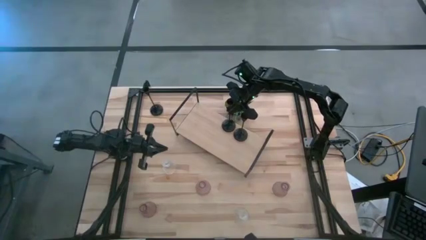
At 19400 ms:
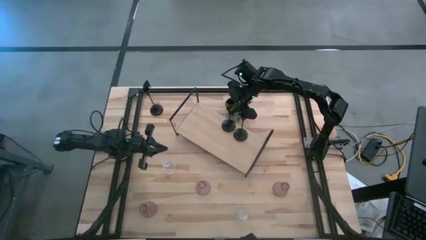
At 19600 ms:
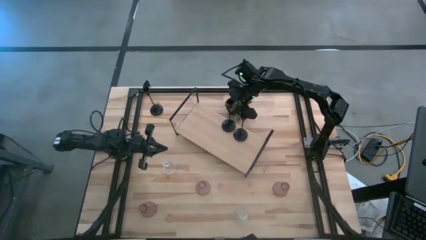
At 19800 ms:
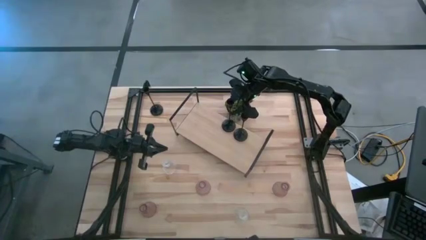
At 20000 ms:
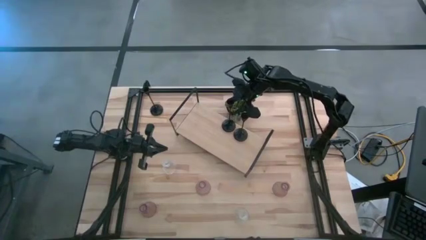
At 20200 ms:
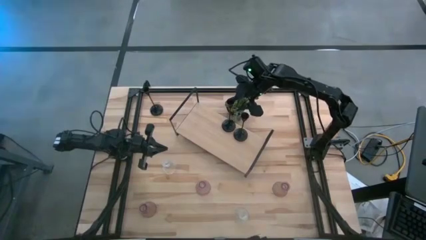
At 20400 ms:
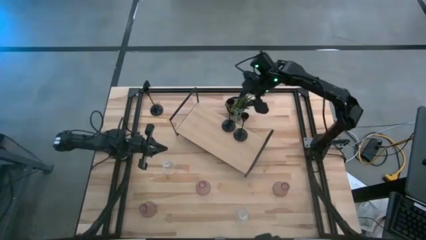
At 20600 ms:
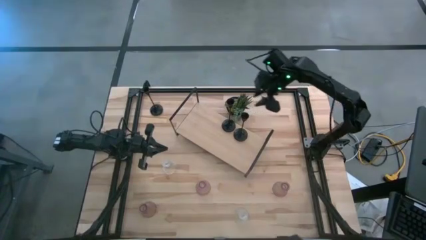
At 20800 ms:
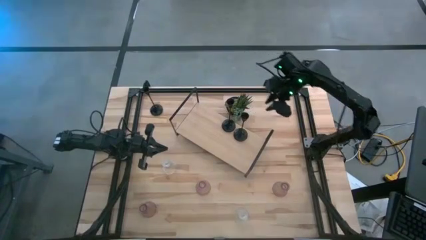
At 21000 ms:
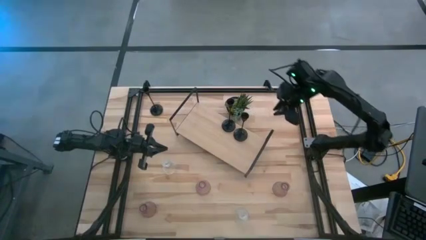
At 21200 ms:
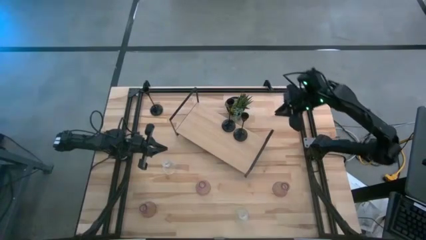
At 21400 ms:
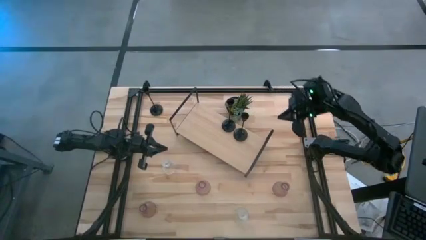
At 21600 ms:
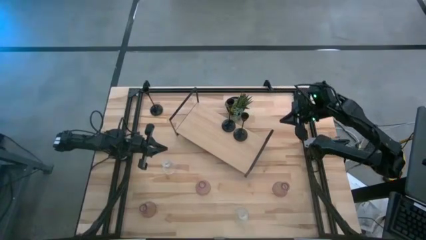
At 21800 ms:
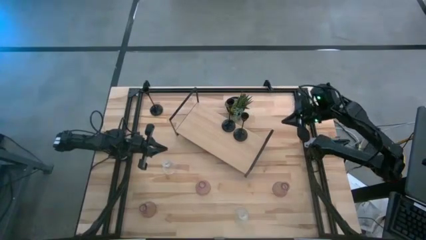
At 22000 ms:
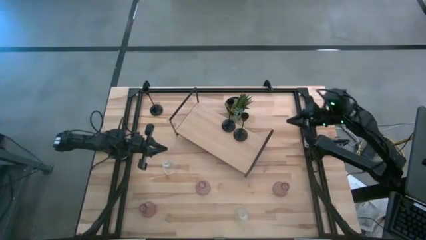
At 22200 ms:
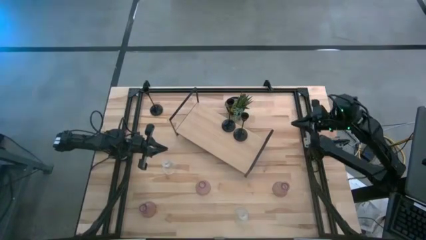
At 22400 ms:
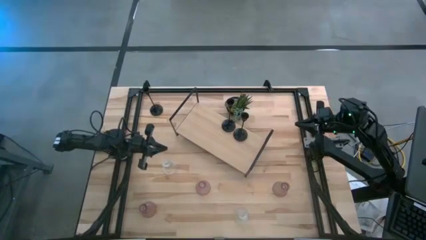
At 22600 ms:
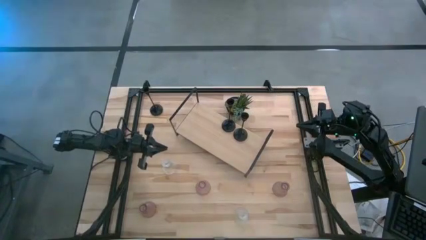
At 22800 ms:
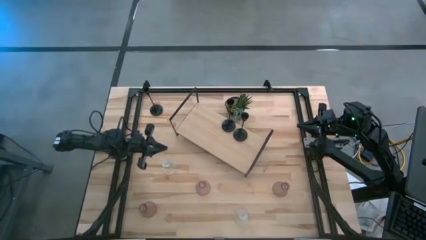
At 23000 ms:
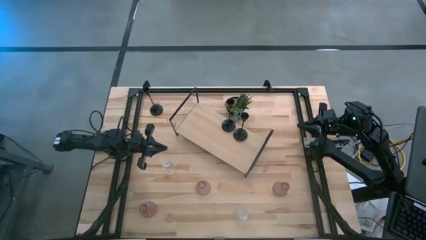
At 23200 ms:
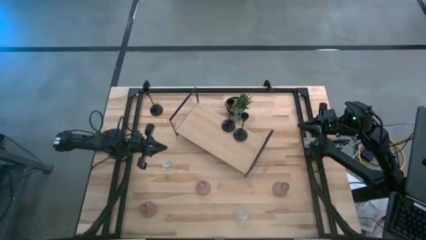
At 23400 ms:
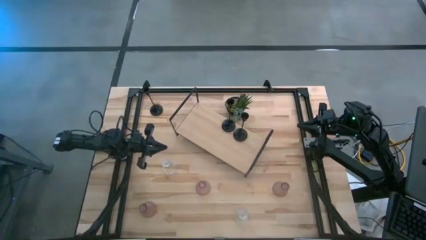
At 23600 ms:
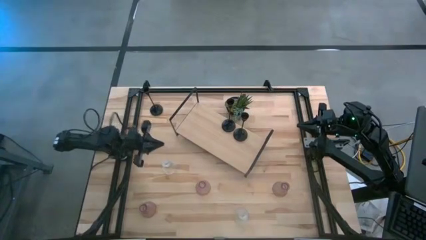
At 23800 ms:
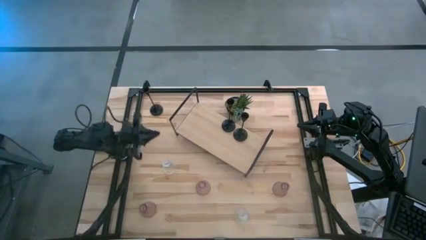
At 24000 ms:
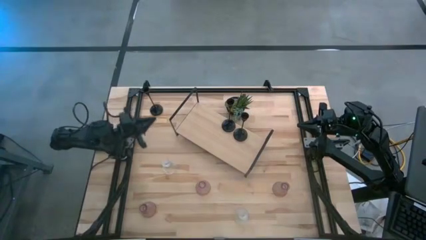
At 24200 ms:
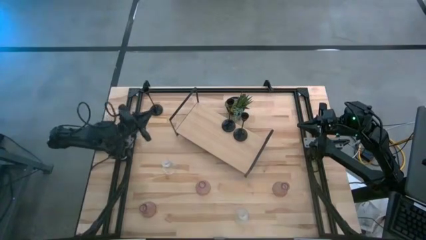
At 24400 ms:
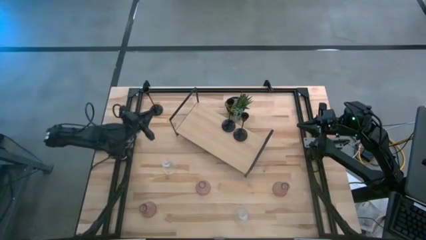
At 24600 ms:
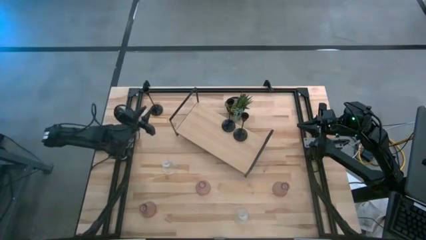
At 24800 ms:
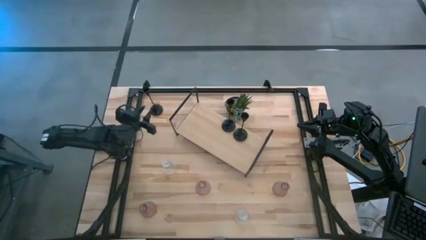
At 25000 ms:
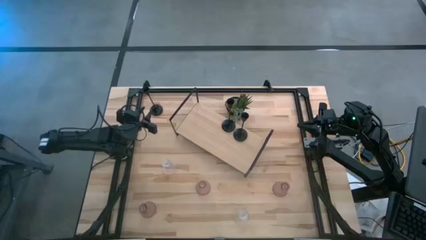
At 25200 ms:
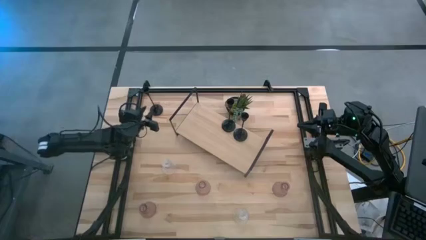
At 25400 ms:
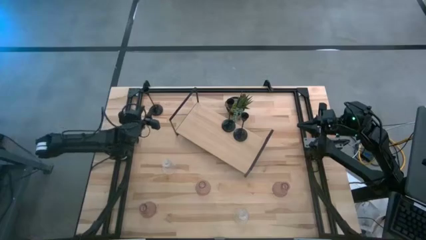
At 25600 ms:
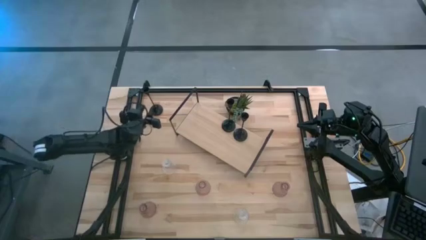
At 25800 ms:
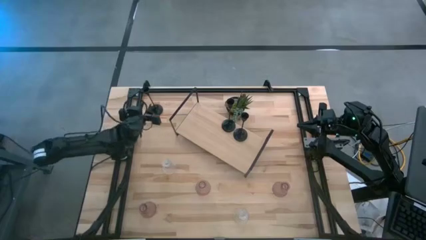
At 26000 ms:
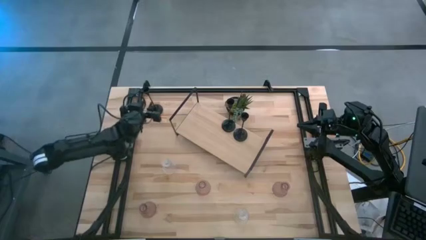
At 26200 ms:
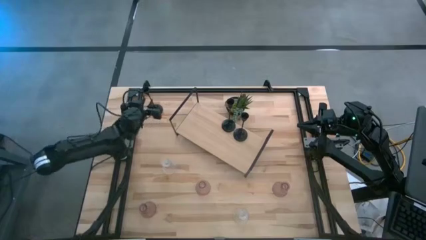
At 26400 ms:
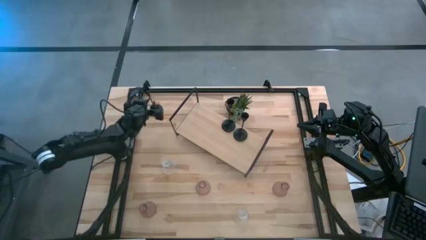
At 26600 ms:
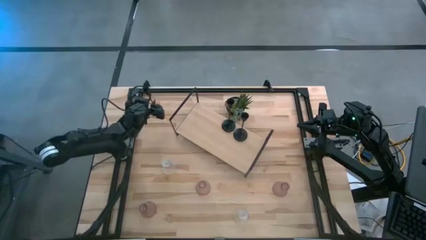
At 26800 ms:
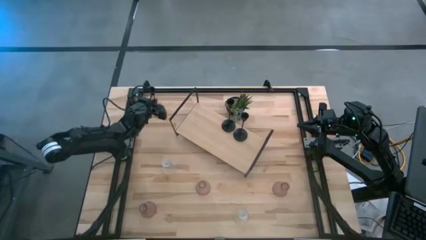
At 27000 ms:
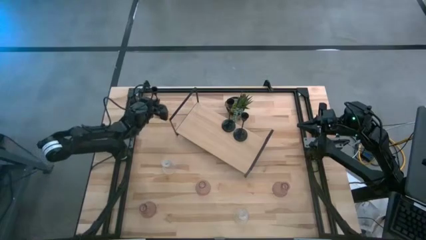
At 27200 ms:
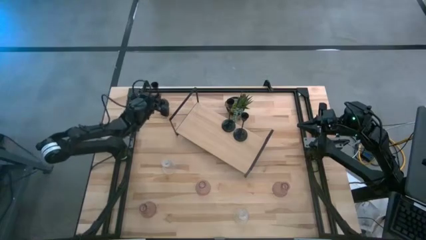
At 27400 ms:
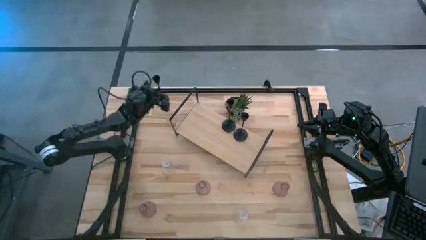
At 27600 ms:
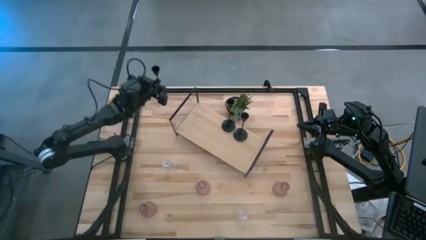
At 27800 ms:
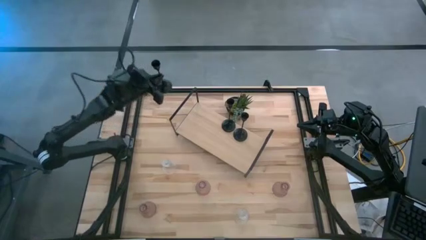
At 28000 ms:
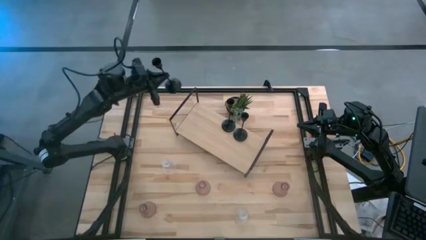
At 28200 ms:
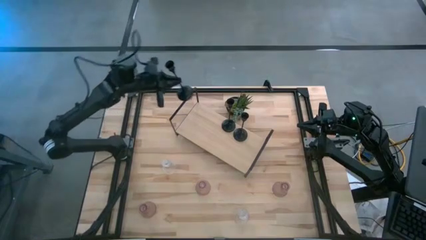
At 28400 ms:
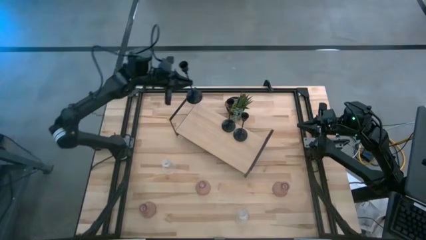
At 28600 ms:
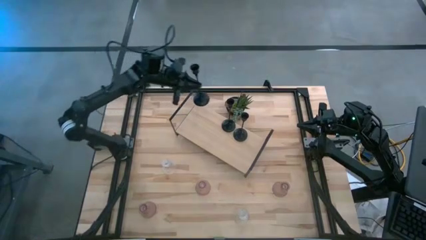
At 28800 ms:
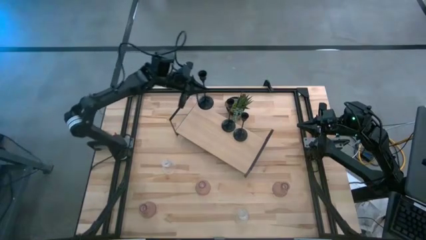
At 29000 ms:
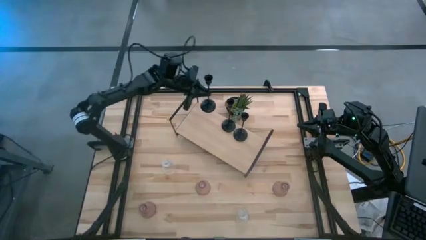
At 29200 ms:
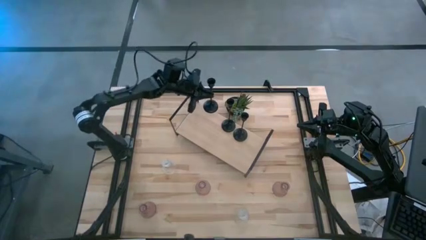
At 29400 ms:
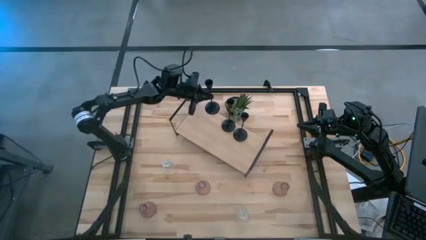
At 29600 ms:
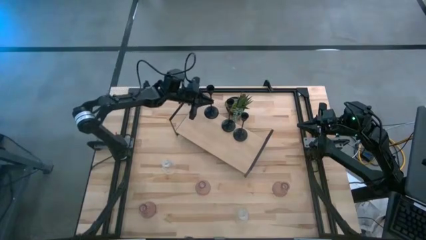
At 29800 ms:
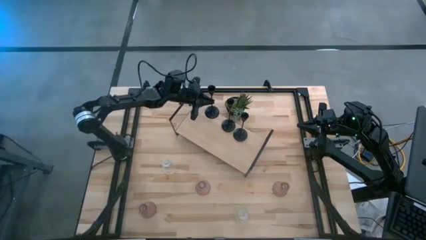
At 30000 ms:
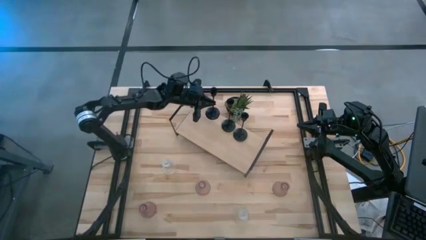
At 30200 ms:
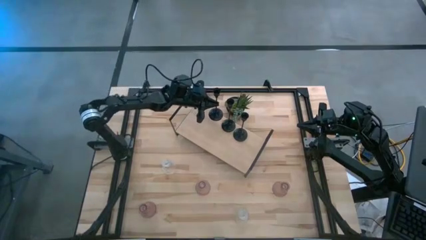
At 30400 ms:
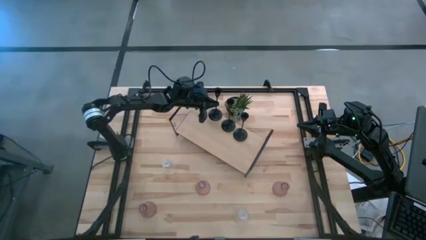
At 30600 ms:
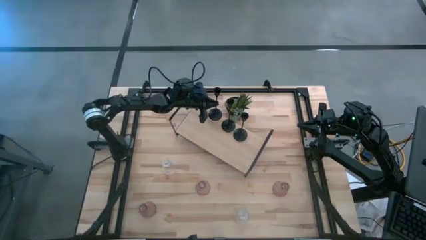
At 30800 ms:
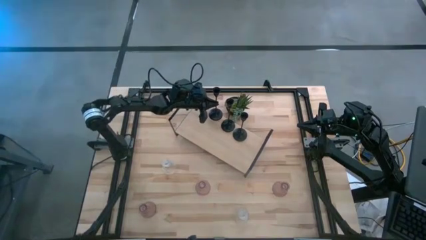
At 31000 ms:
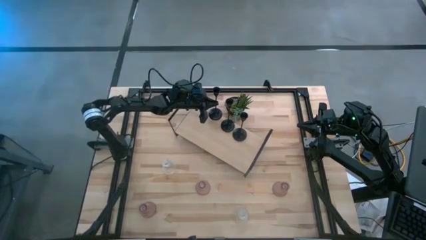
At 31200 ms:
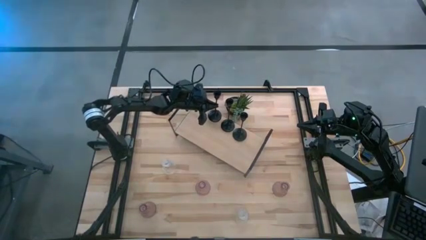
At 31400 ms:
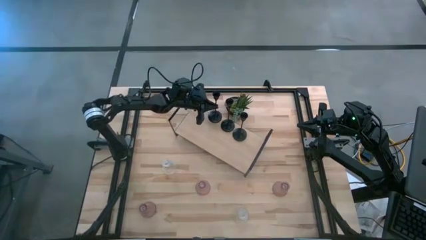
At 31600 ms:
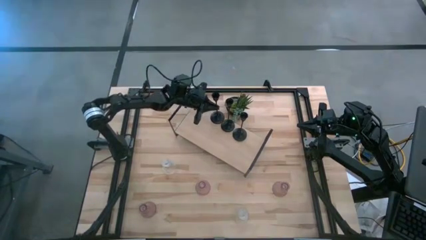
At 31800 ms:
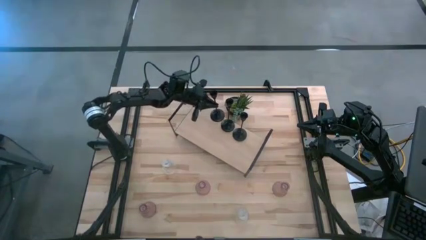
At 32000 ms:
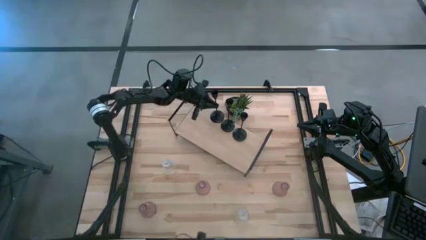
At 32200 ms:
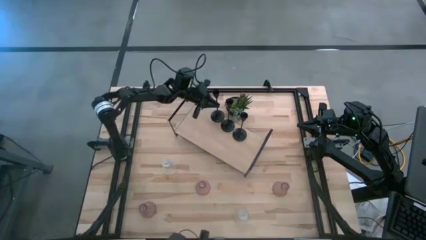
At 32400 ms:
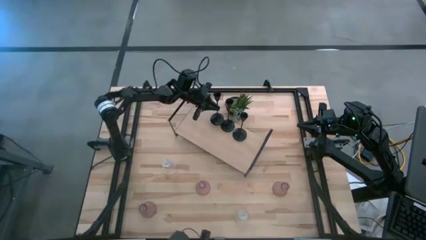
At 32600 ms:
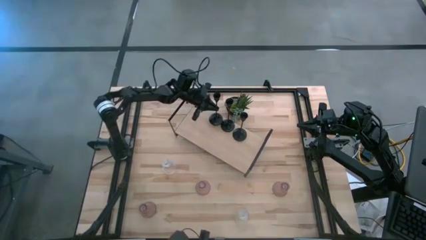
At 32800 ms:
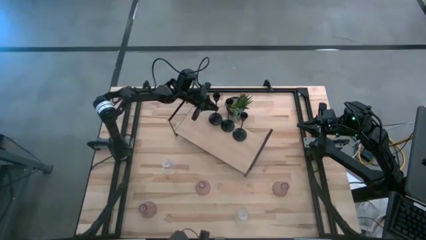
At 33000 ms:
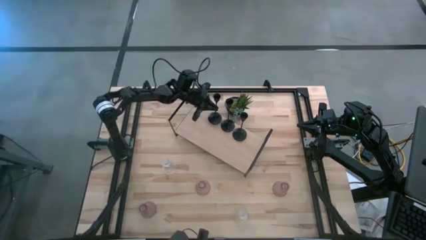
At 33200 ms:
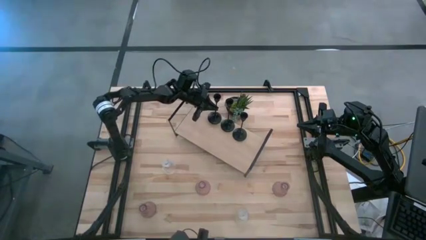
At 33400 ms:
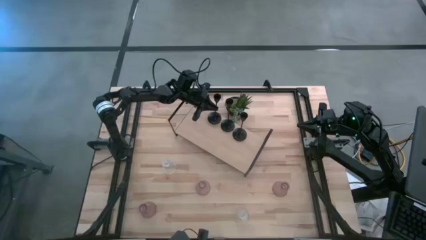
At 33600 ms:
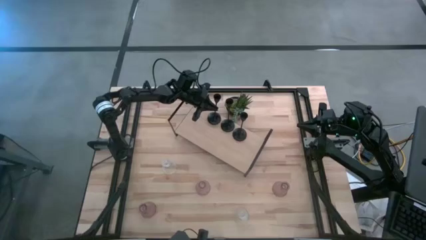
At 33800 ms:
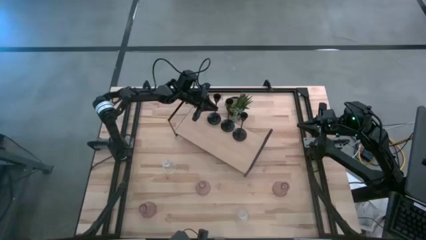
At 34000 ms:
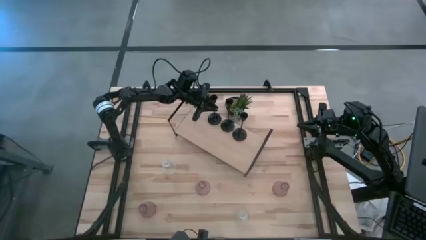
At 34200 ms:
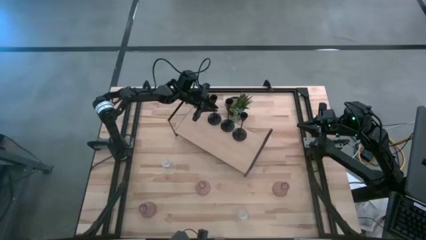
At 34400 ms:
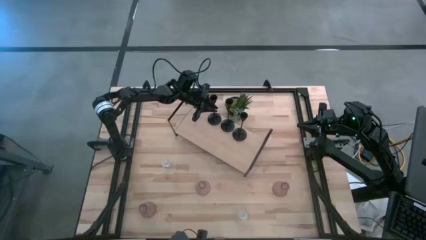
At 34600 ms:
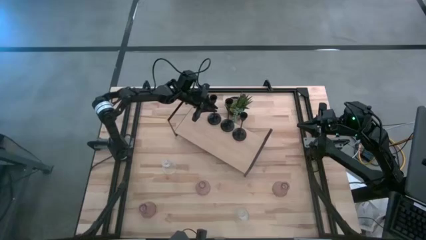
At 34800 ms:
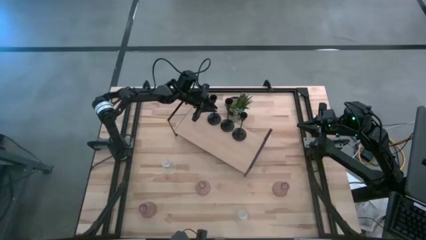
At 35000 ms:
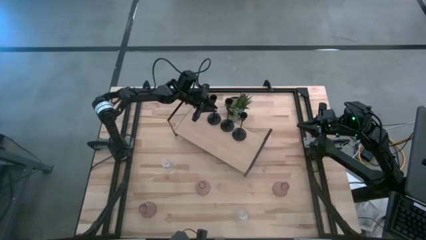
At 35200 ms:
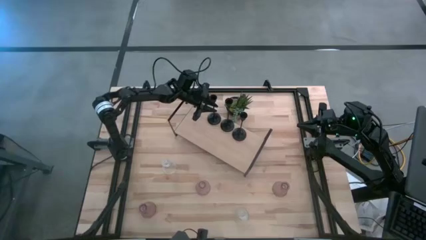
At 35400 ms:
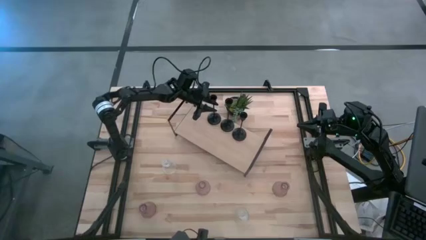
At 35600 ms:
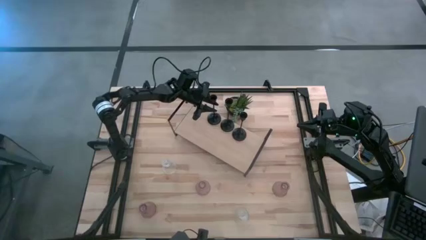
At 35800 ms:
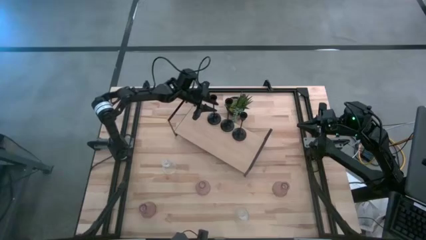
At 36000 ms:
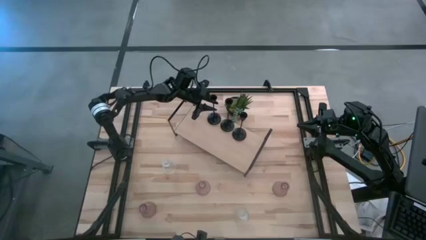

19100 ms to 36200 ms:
Task: Pick & Place candle stick holders
Put the black candle holder on the shelf
